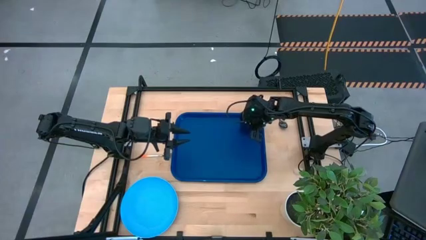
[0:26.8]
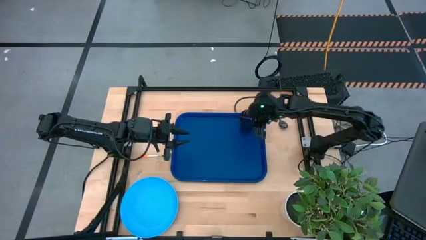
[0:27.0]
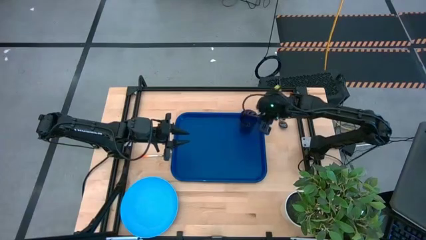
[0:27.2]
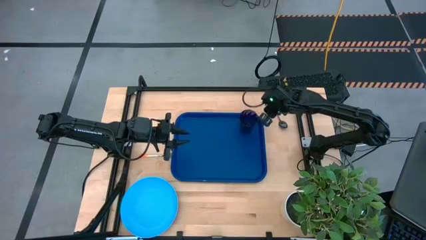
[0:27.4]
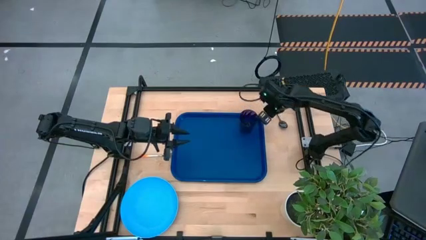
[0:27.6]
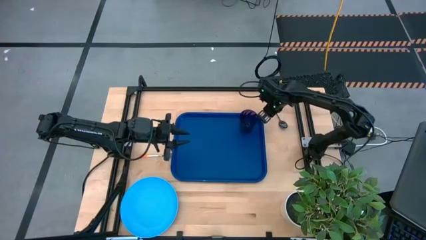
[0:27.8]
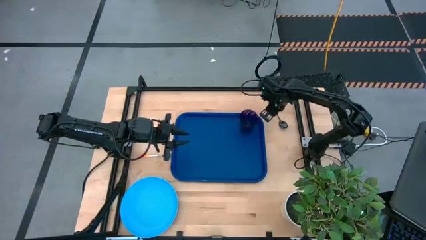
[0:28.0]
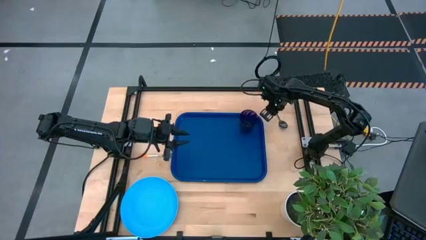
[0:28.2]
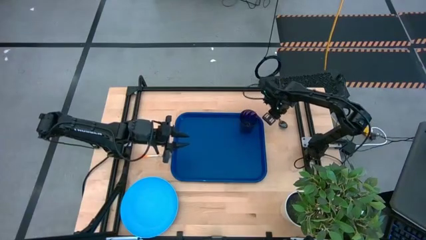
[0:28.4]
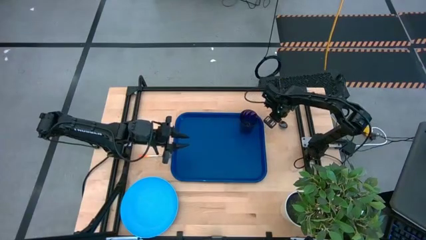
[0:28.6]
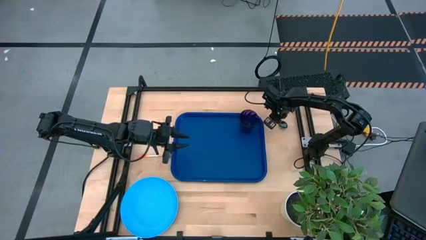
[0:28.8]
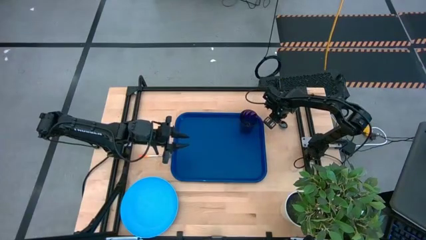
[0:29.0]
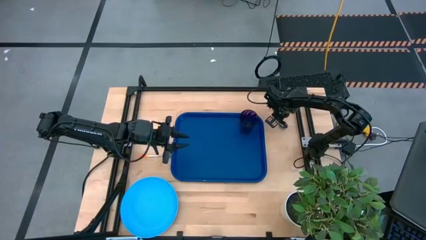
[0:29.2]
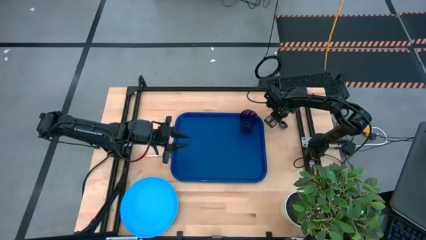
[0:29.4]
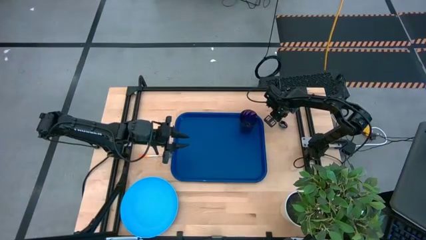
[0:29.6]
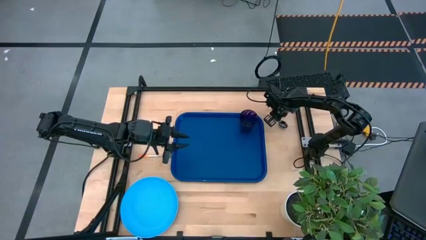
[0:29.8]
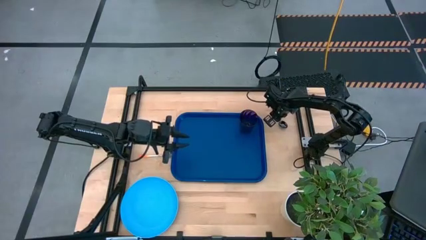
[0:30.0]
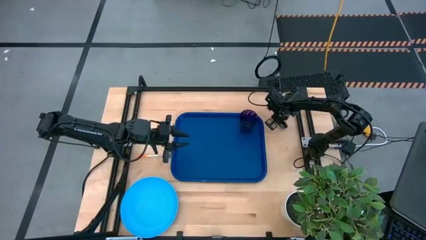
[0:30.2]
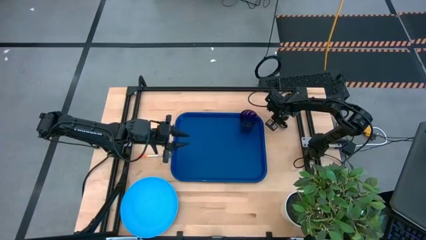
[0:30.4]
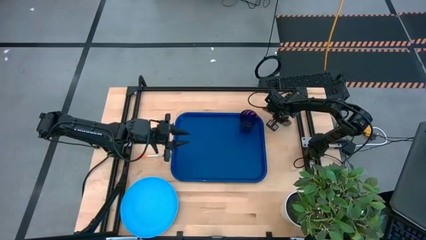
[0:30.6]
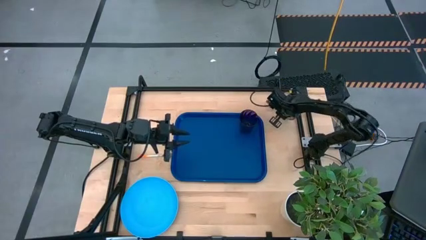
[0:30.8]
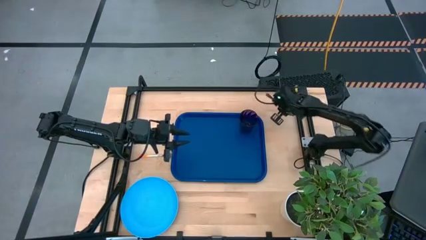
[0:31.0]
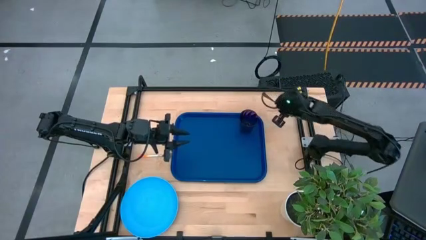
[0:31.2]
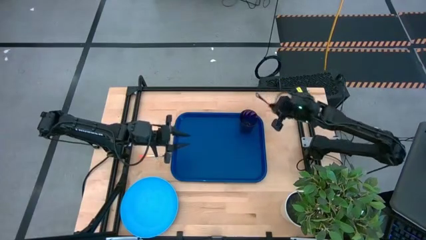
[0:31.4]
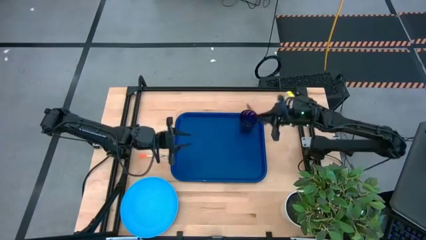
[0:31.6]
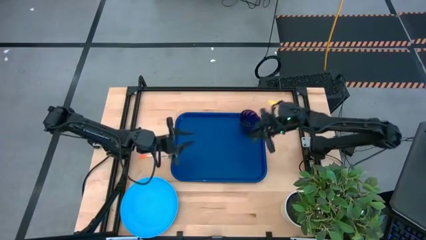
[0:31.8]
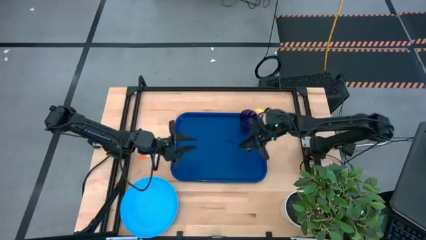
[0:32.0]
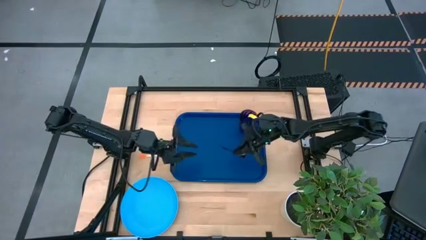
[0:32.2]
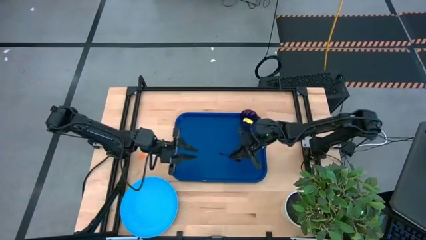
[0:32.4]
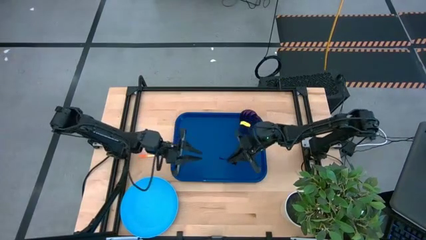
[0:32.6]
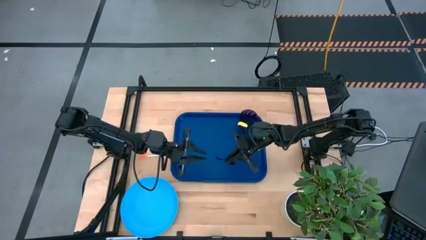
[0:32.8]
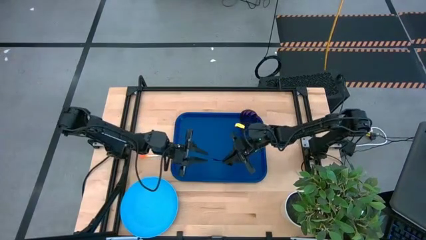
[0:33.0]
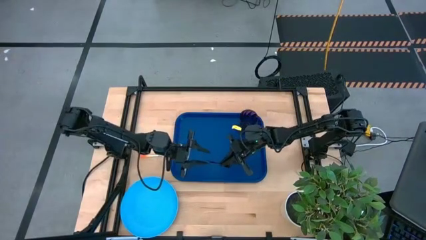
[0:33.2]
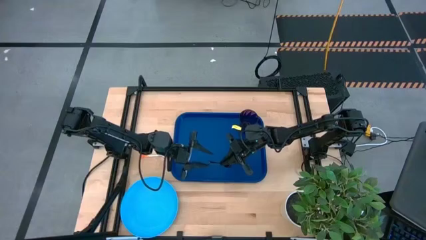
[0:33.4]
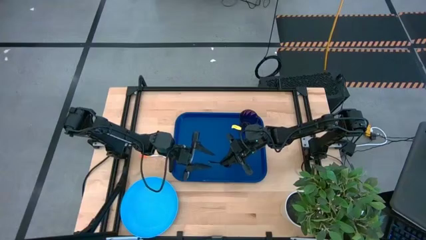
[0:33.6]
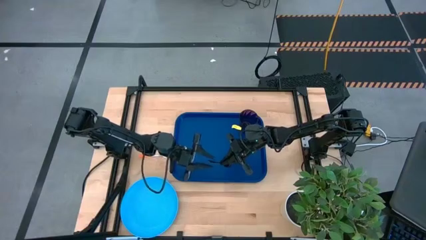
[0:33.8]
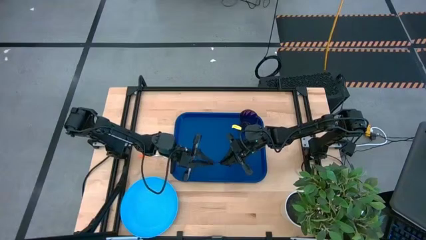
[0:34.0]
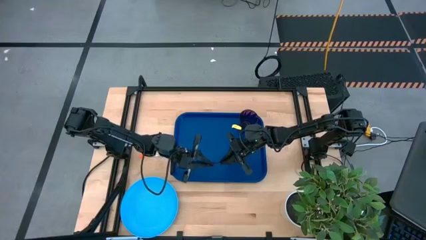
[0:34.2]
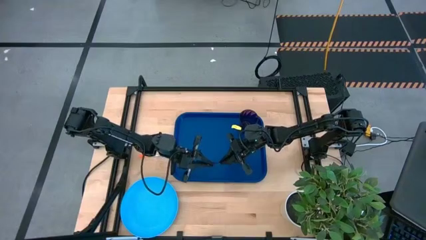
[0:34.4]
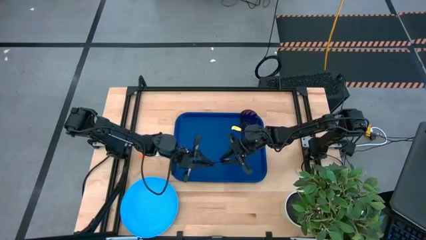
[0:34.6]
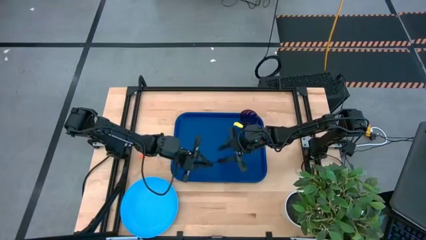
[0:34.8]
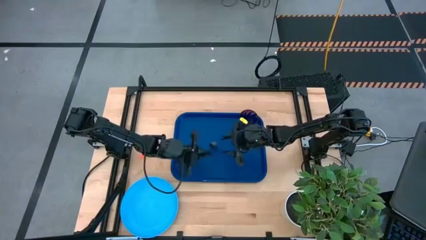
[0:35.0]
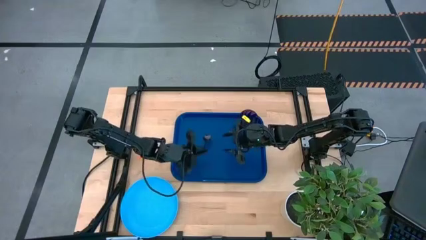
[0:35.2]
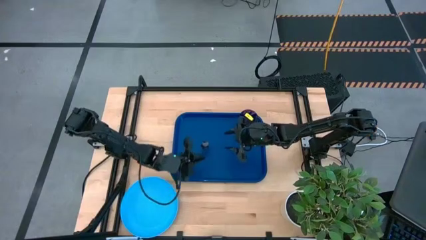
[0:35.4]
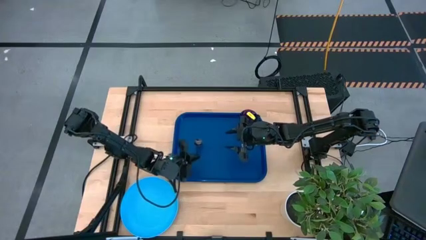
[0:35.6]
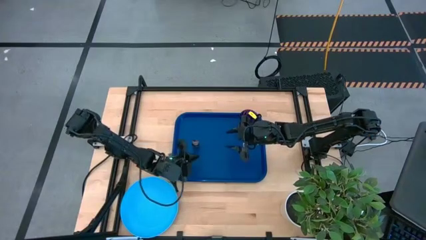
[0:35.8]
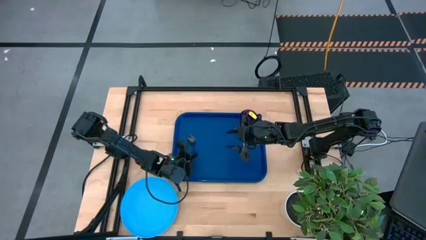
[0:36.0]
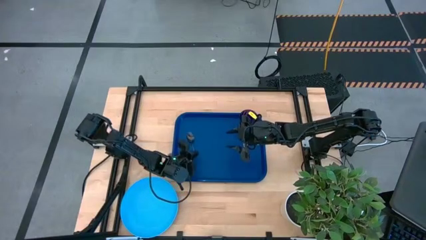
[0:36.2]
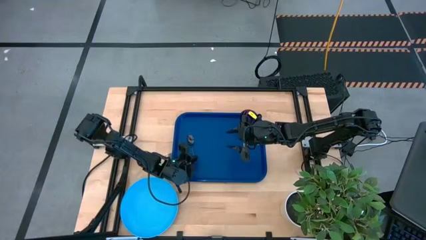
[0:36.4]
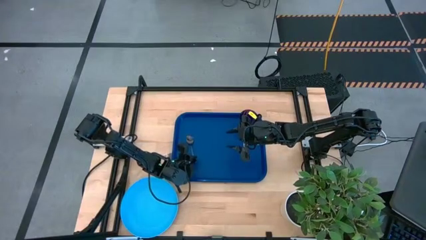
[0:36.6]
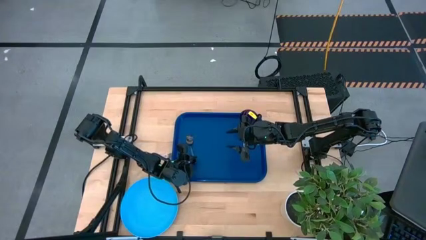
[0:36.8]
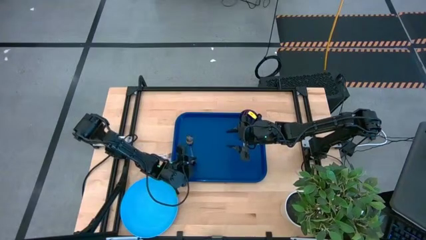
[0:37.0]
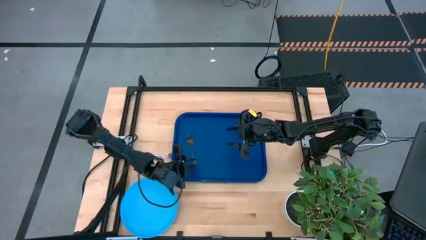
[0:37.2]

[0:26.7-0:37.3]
Task: Pick and place plate/cup/fork/spoon on tray
Put the black spoon on the left of the blue serving tray

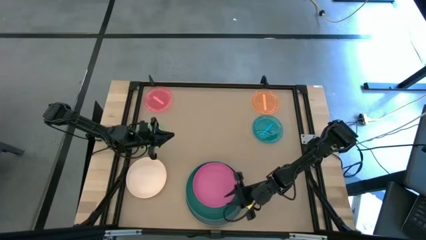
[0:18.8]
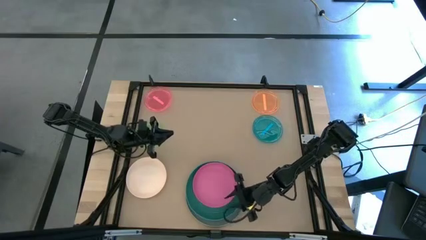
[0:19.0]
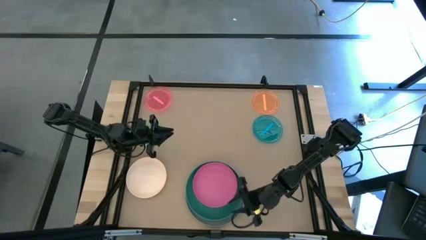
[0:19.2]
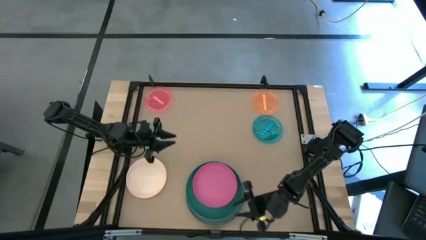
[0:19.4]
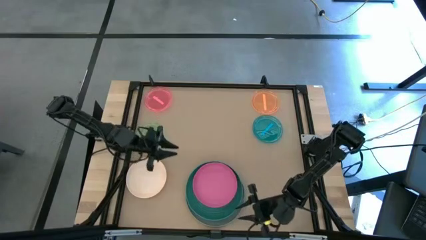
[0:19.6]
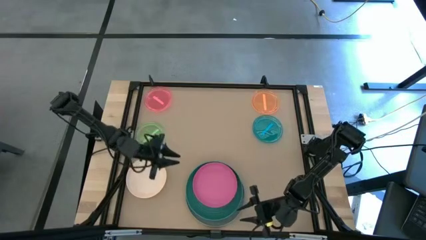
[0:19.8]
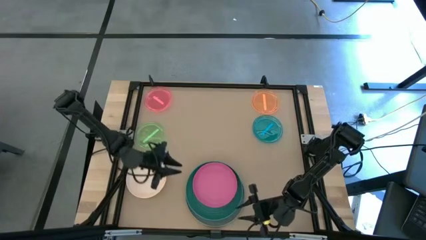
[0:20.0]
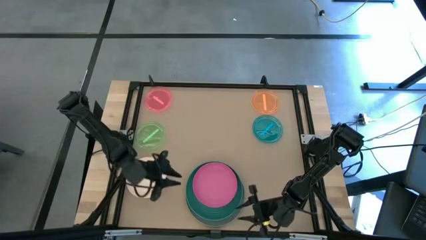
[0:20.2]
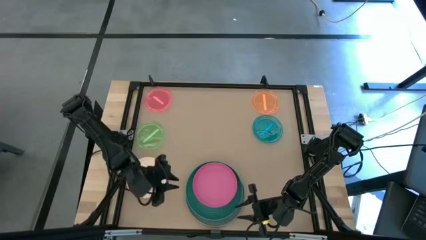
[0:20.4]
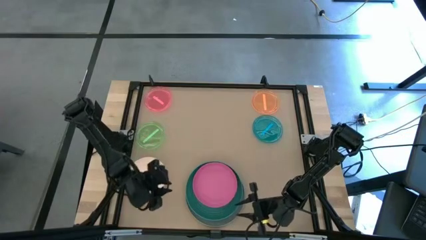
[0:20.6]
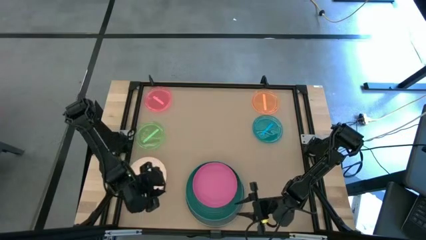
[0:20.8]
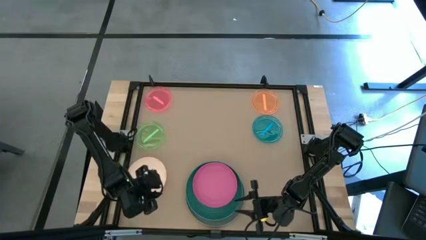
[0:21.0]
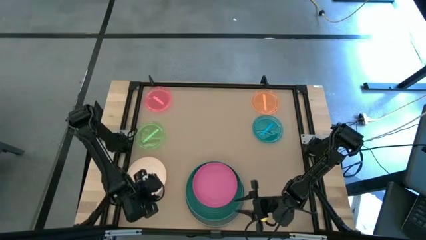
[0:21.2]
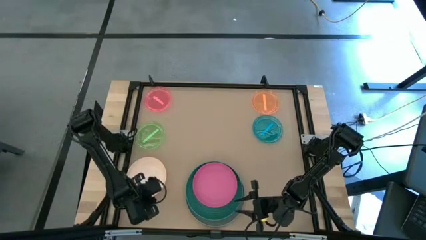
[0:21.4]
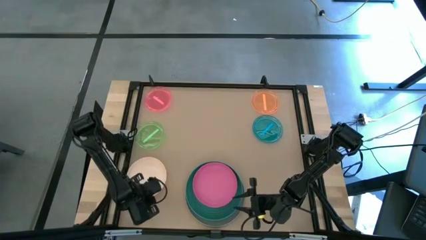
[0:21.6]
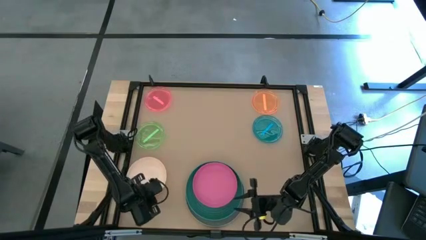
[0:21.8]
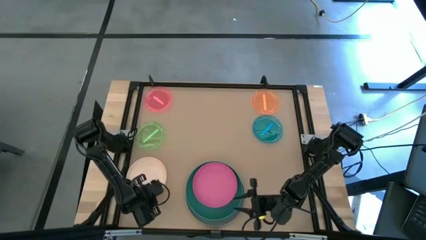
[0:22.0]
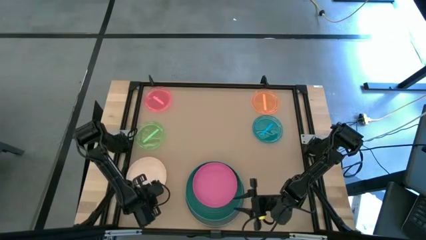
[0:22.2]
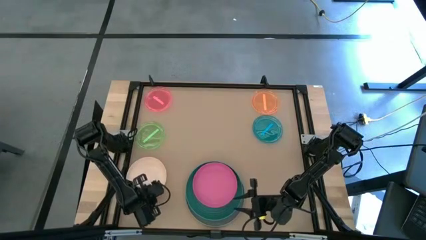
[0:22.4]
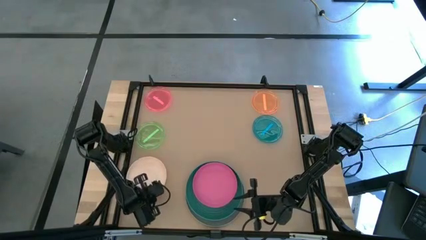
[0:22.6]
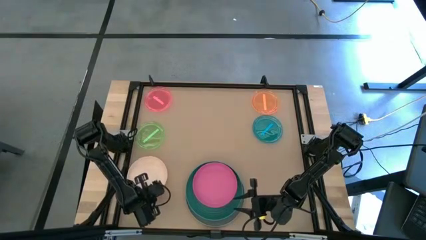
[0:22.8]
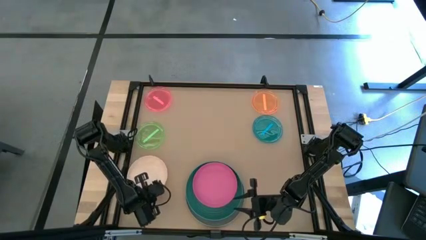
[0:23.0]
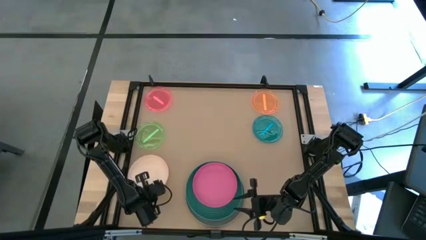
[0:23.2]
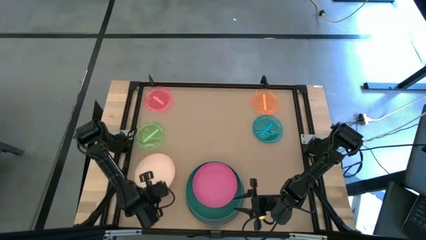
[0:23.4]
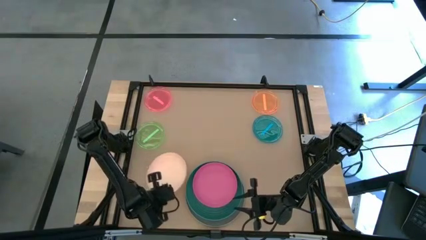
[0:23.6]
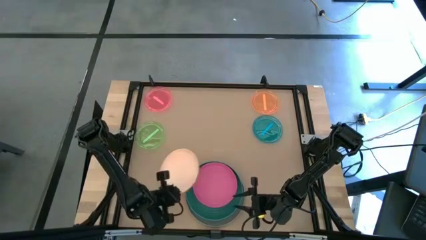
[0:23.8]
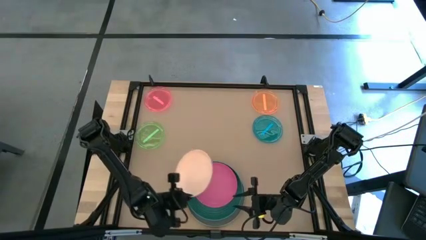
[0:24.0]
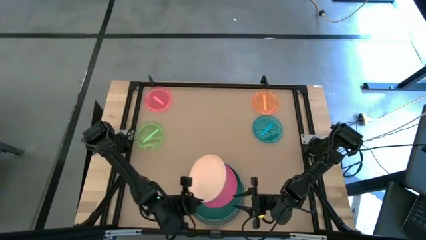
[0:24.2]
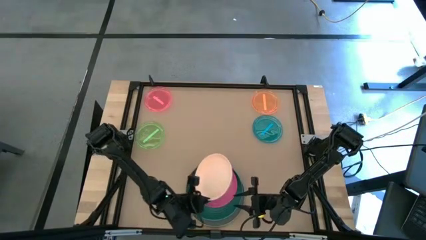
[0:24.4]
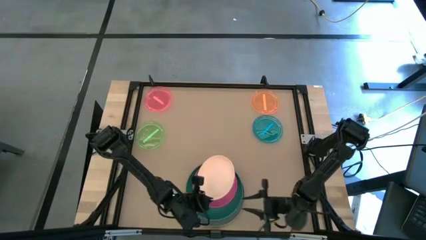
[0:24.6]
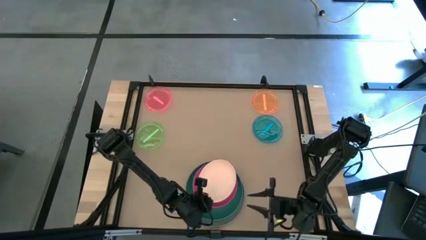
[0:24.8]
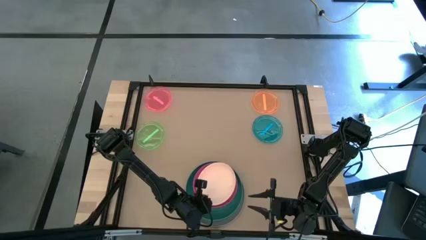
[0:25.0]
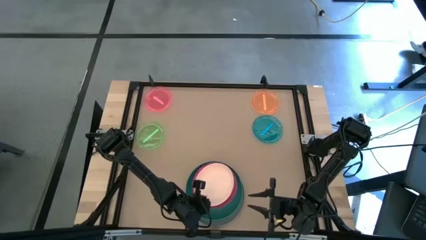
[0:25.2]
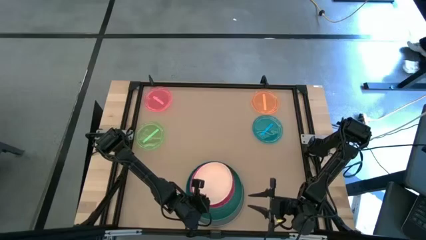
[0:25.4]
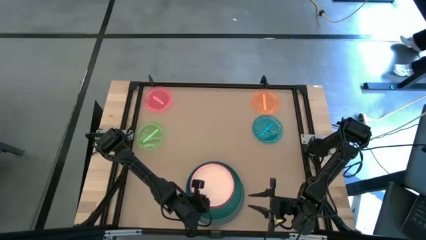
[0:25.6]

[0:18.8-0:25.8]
Task: Stack plastic plates
Stack the white plate on top of the pink plate
